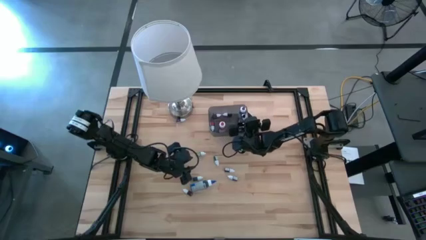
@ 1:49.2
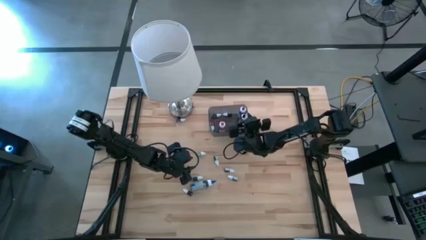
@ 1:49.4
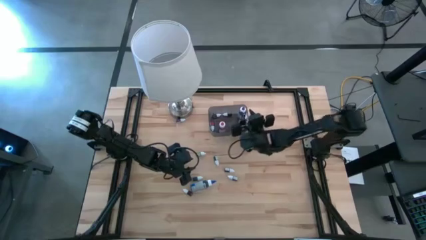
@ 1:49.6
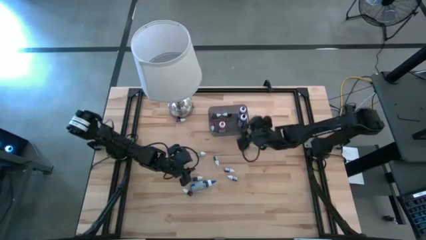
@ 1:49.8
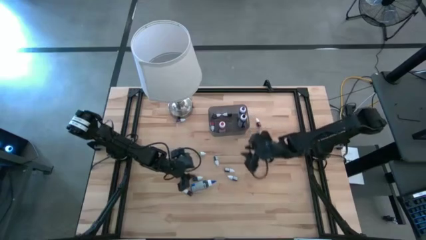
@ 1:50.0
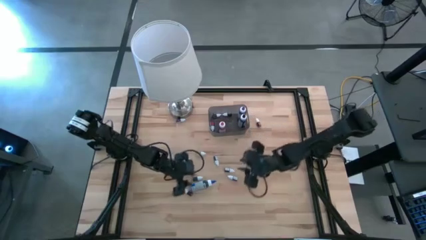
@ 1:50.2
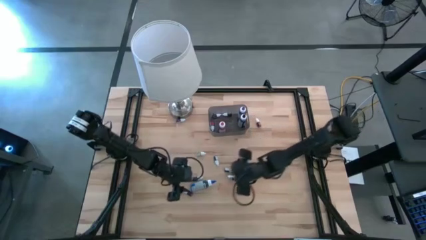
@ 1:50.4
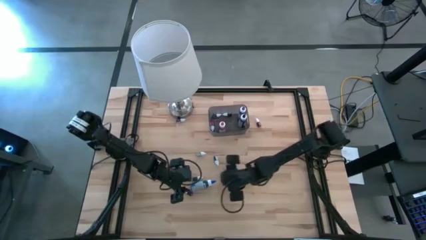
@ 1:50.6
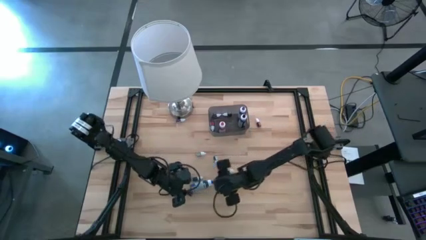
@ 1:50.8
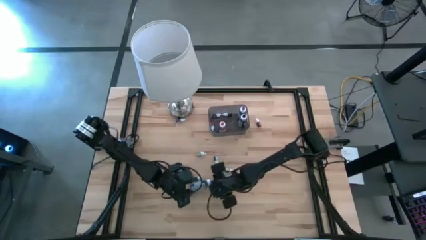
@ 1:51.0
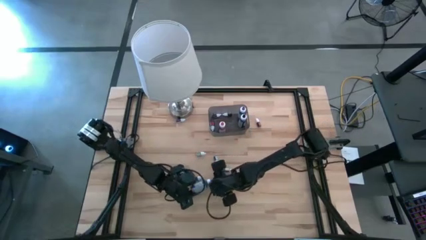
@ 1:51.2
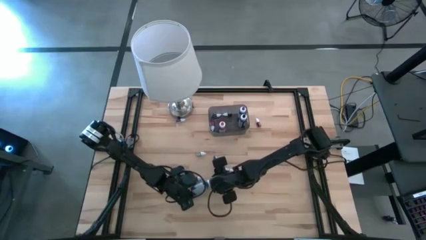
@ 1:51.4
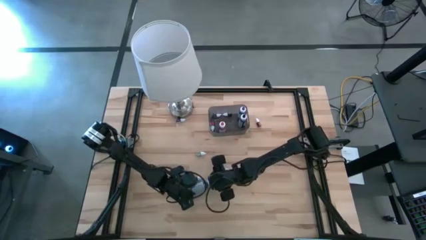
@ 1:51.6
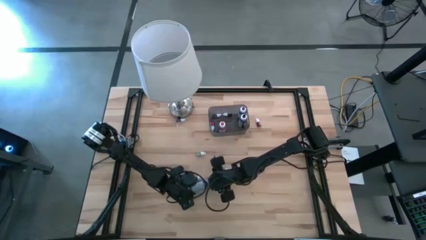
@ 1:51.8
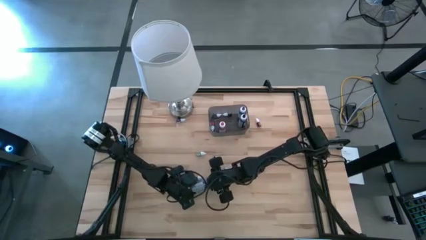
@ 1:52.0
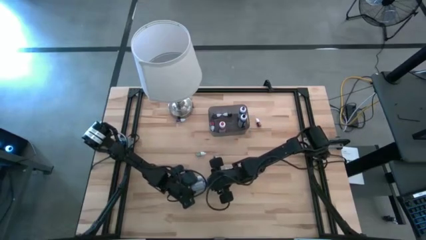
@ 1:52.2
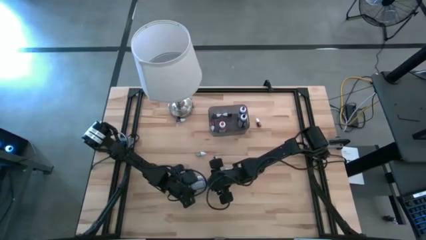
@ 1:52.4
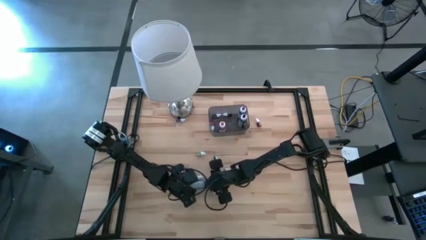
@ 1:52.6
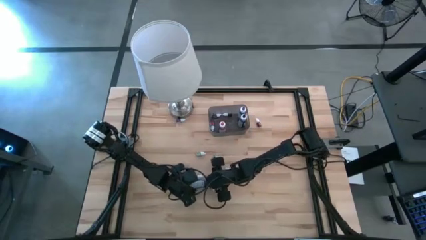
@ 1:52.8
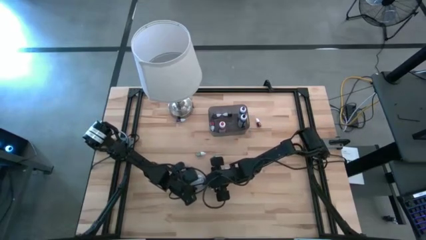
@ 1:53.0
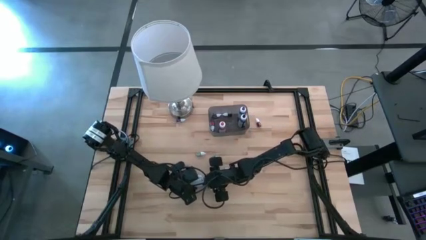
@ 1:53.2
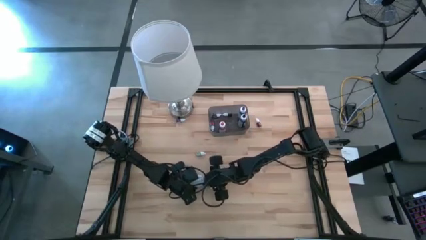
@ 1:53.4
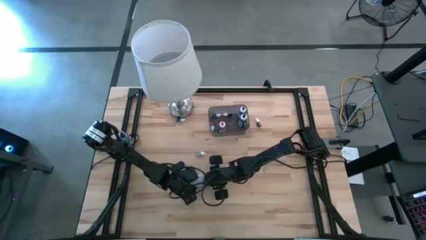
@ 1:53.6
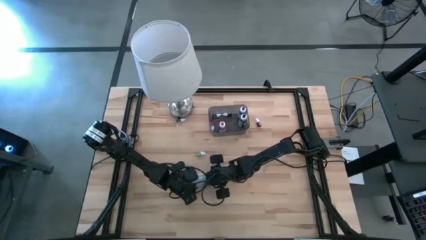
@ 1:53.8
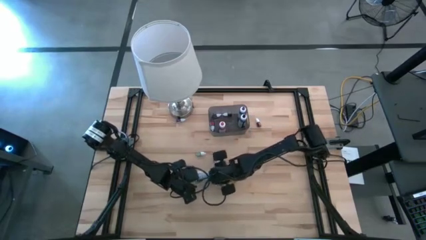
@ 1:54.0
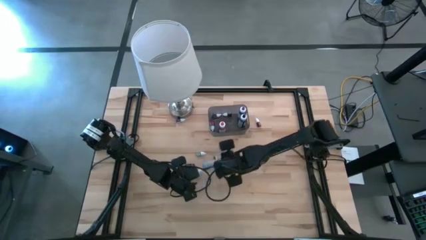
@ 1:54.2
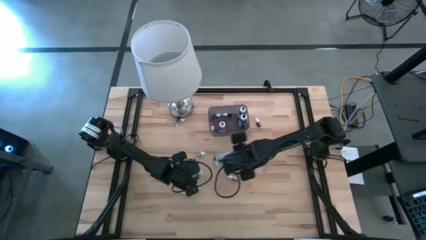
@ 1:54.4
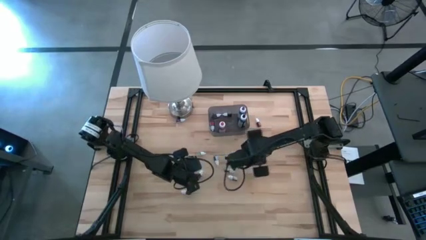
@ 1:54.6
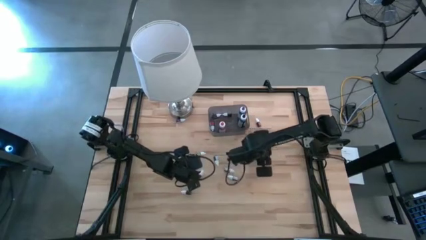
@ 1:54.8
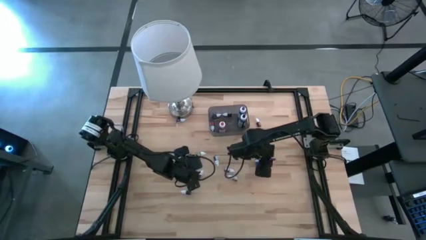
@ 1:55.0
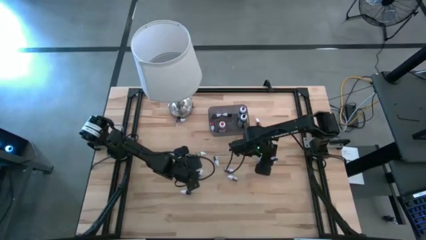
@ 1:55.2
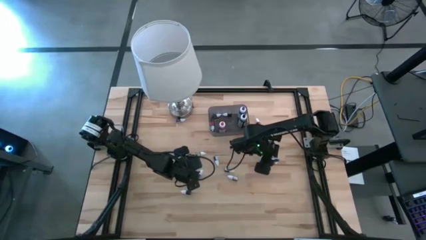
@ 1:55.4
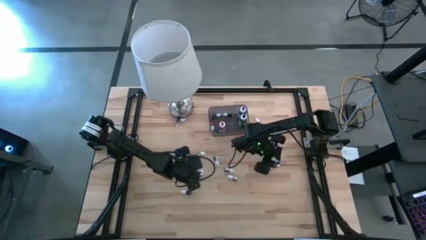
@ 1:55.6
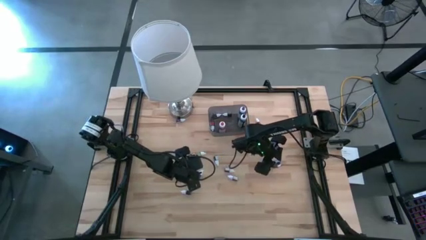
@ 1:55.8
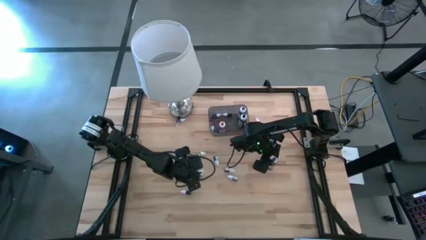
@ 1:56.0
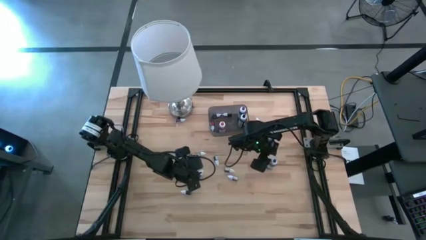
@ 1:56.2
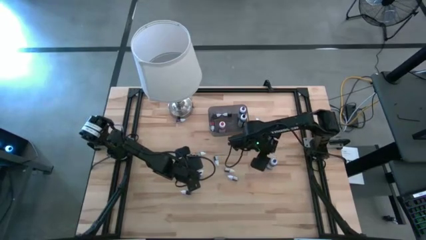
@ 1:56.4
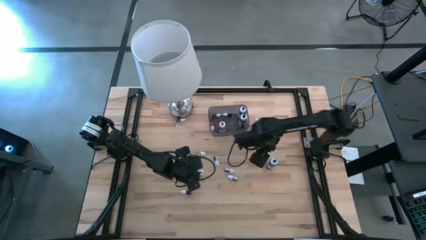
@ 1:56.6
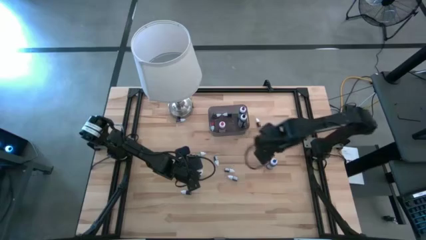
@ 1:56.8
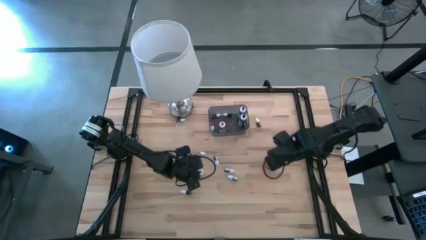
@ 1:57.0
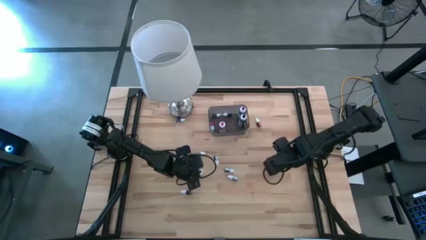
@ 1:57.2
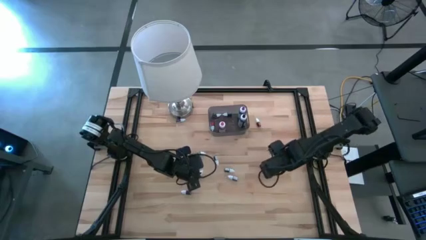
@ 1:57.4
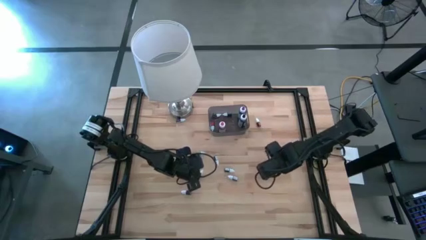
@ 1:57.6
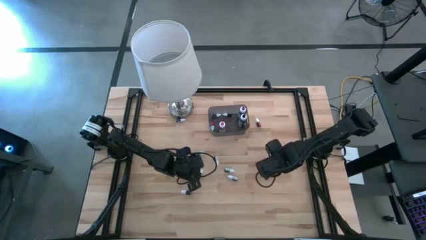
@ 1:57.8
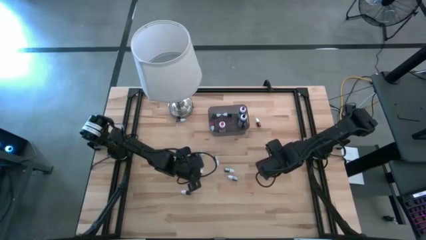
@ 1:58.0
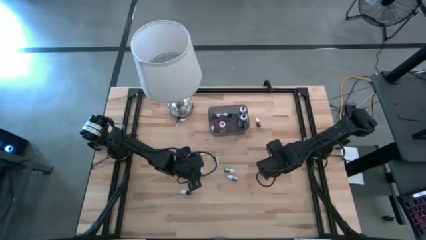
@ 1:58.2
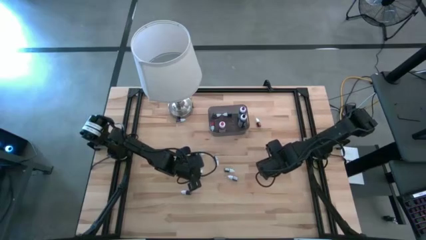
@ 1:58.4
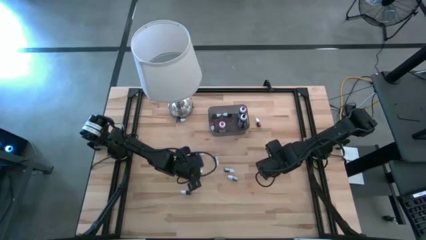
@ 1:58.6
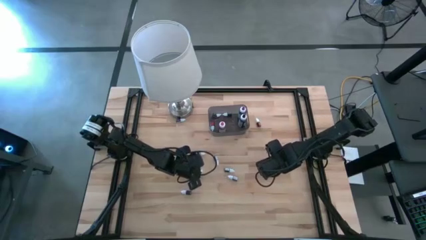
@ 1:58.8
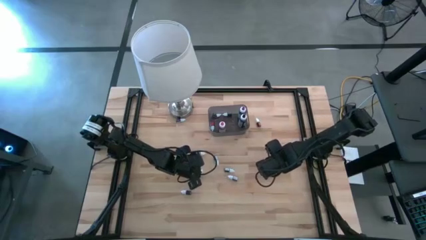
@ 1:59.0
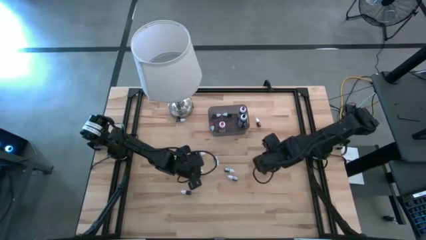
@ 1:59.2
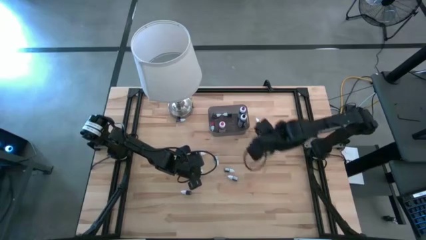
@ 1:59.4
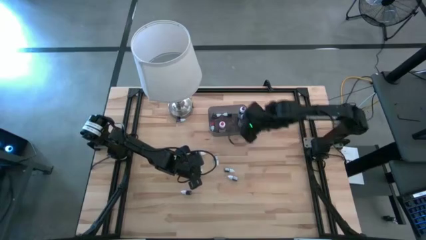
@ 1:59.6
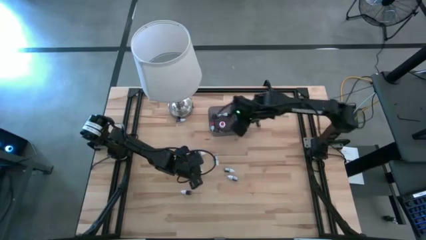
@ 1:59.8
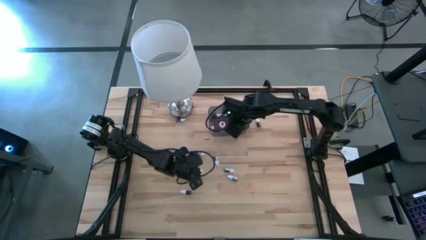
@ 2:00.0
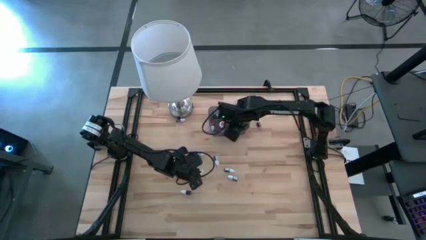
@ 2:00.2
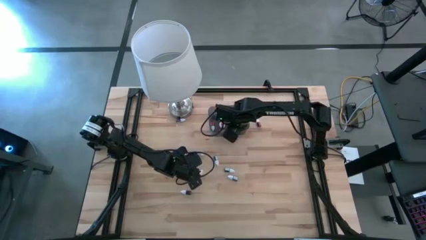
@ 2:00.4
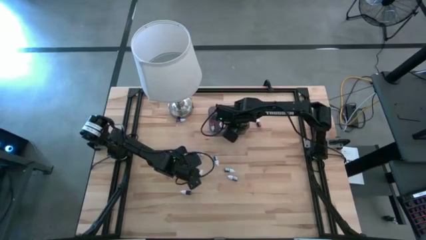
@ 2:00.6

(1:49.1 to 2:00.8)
Task: Pick & Place food coloring
Put the large blue food coloring bottle into the bin

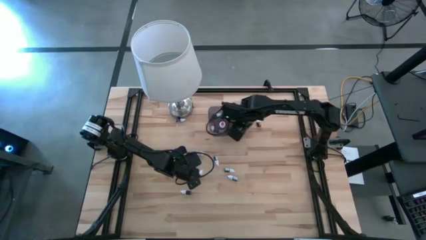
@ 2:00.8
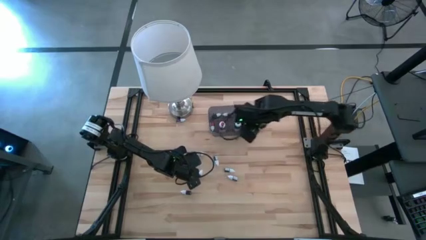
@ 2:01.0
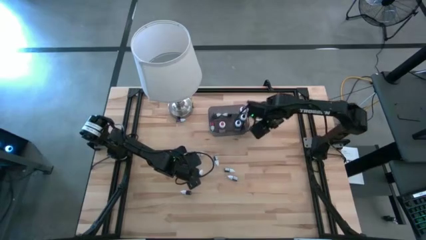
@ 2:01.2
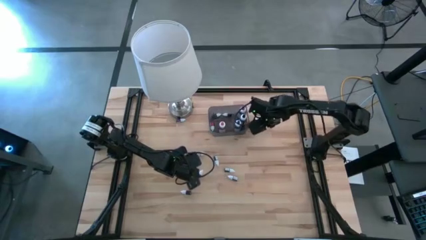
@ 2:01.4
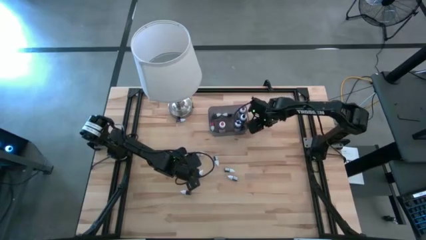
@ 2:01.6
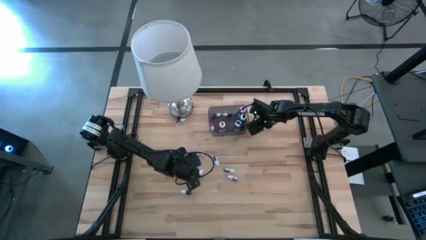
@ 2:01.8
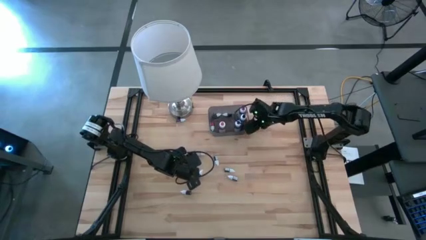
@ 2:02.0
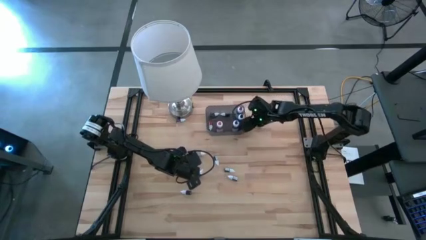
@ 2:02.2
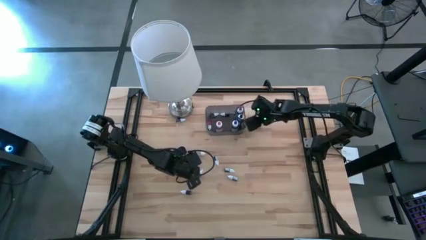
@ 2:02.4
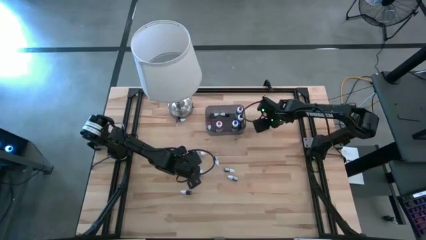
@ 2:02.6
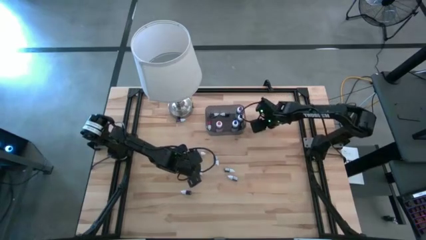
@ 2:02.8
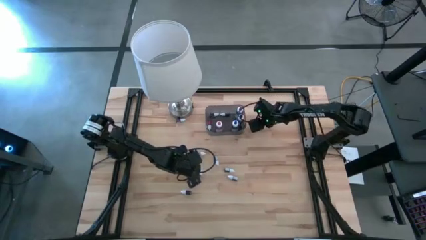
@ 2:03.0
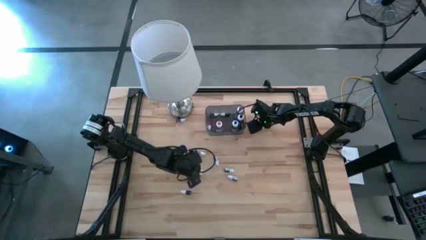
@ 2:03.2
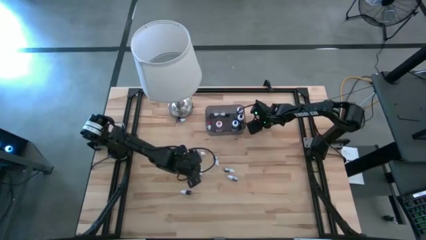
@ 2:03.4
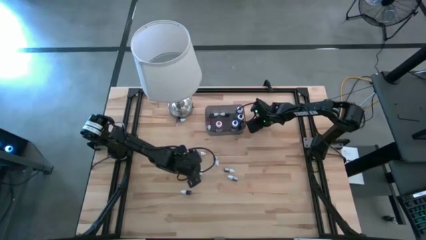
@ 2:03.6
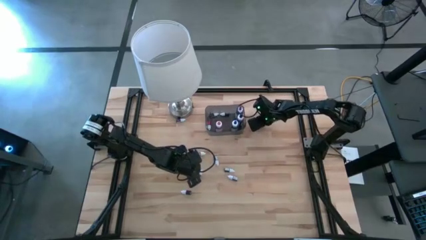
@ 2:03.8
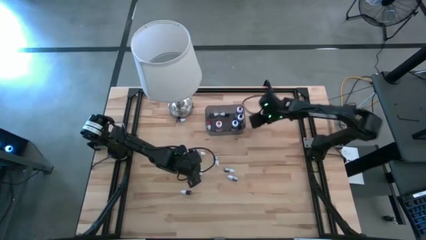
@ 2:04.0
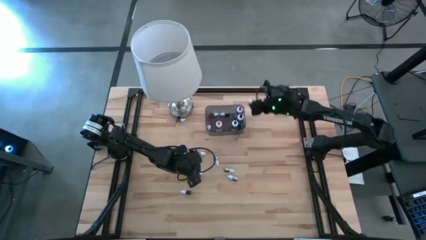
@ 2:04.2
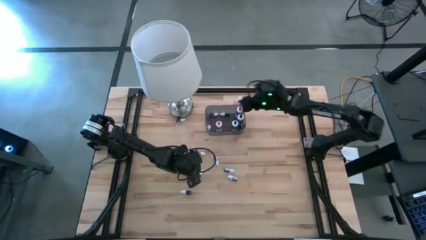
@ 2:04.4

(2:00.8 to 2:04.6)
Put the small orange food coloring bottle into the bin

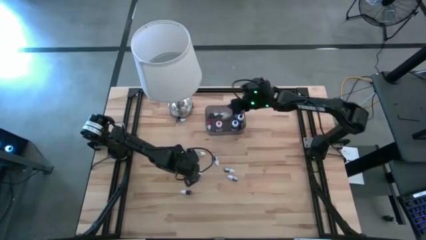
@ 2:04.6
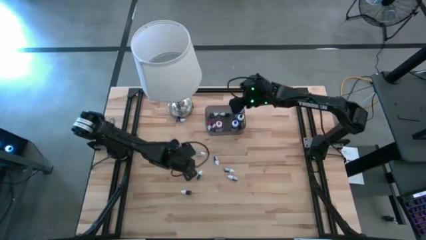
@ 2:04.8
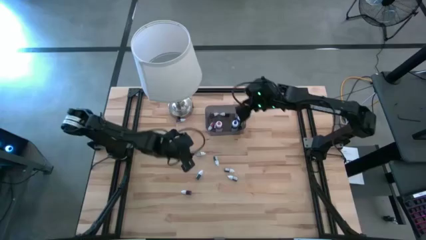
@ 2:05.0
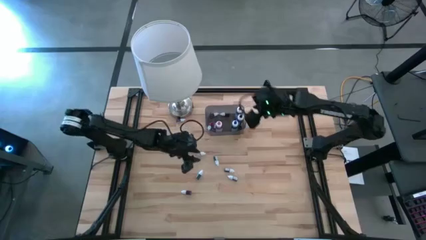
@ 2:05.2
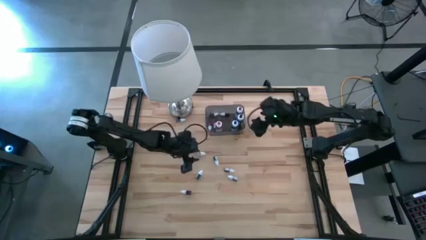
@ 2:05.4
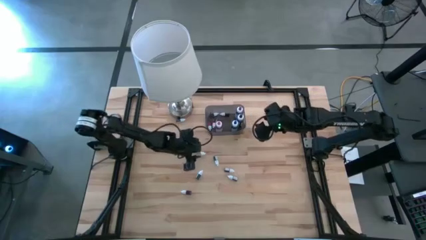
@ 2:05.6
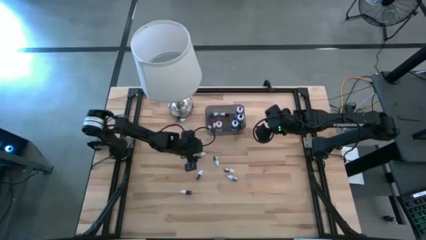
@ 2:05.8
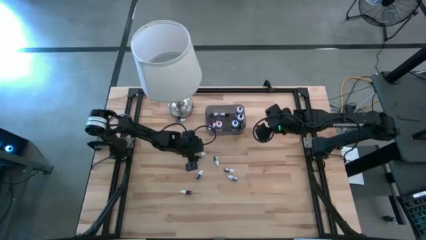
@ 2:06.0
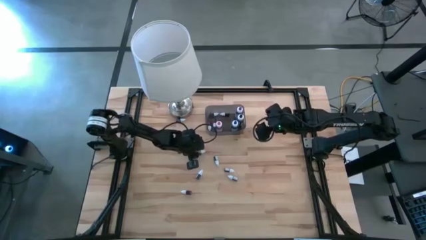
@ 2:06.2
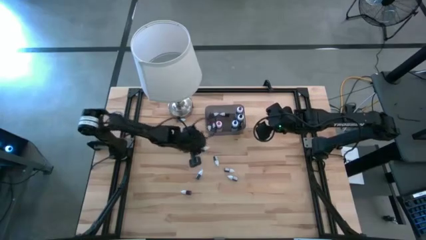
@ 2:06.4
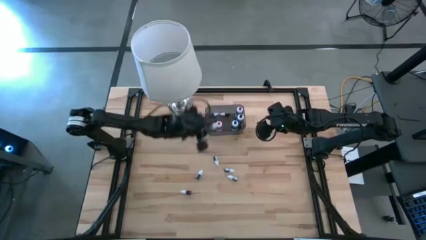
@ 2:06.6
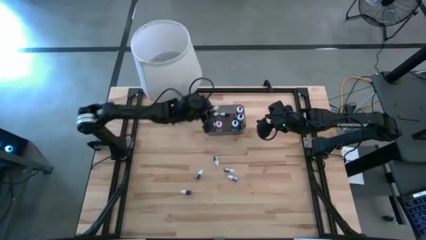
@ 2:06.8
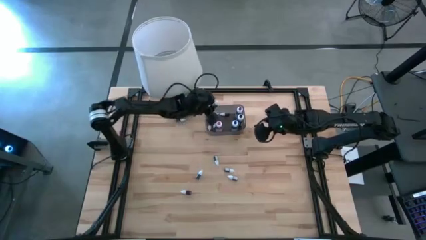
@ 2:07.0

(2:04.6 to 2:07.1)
Put the small green food coloring bottle into the bin
